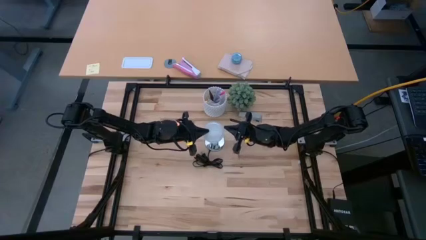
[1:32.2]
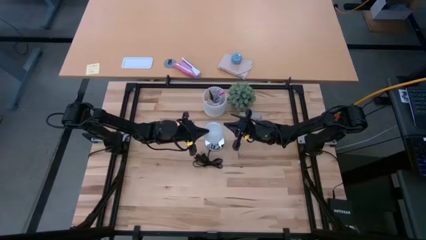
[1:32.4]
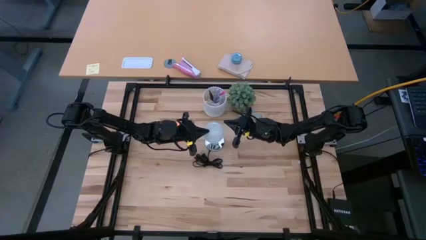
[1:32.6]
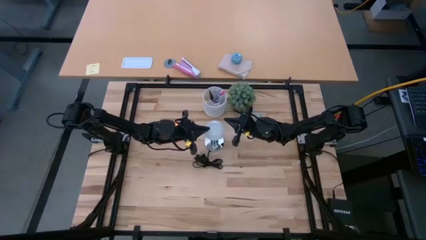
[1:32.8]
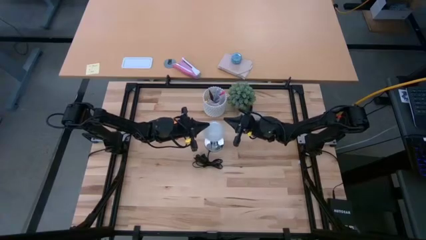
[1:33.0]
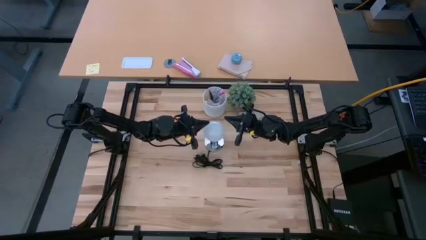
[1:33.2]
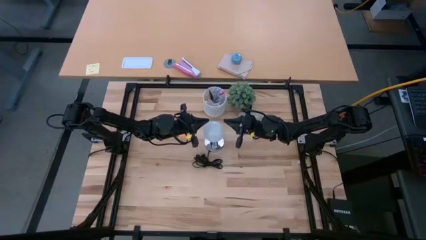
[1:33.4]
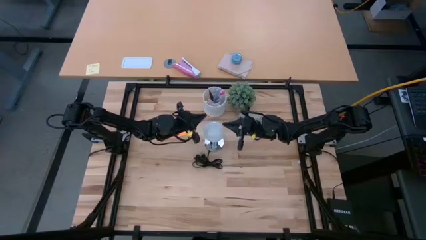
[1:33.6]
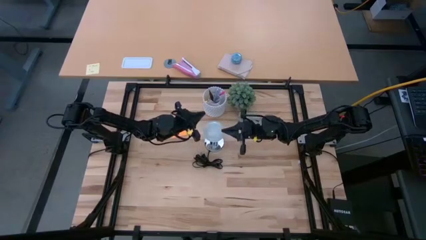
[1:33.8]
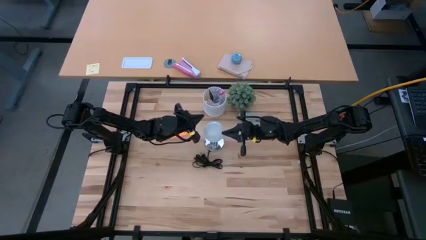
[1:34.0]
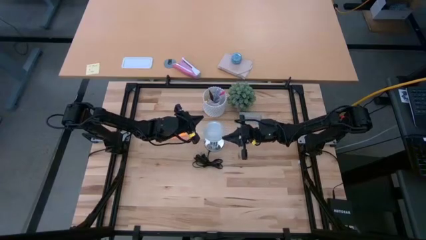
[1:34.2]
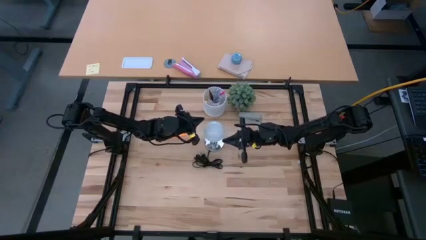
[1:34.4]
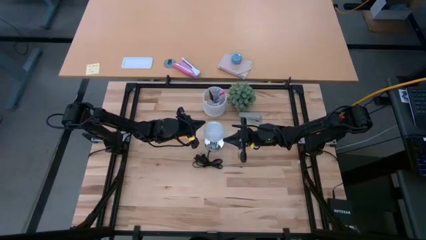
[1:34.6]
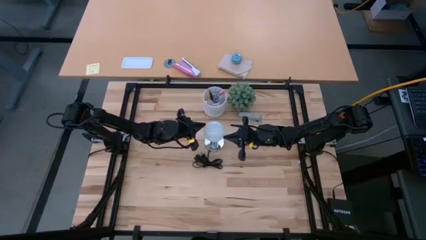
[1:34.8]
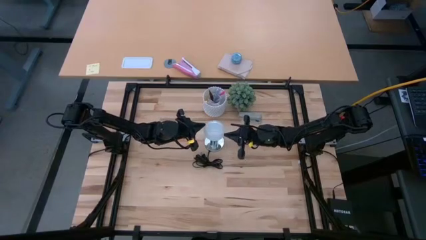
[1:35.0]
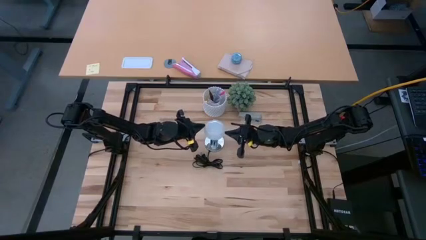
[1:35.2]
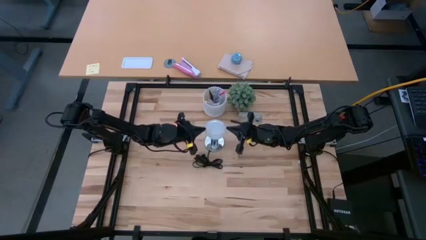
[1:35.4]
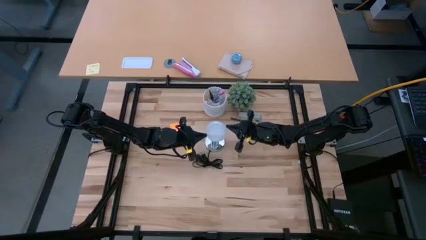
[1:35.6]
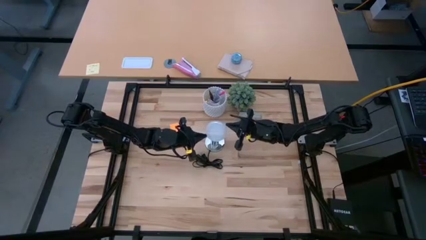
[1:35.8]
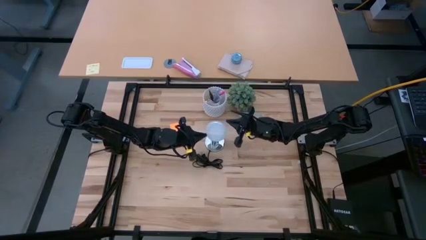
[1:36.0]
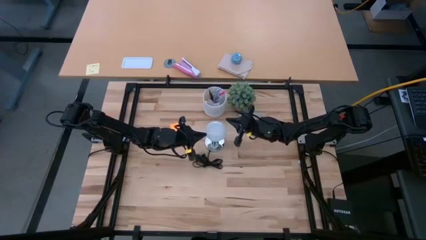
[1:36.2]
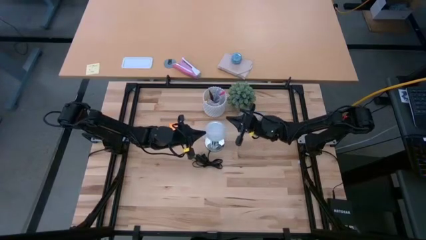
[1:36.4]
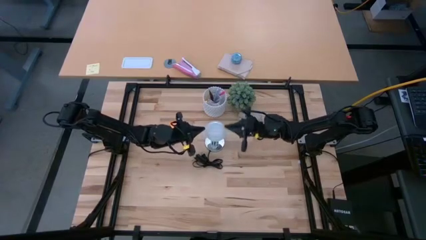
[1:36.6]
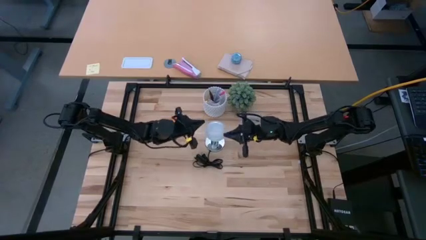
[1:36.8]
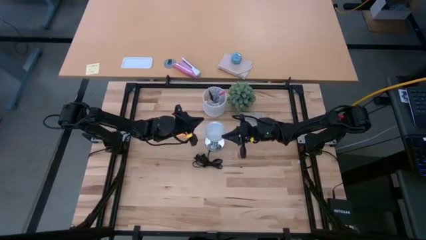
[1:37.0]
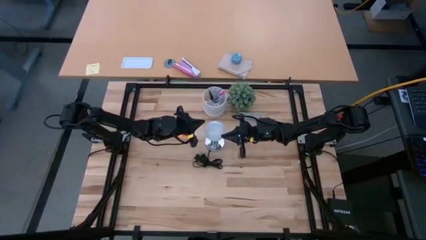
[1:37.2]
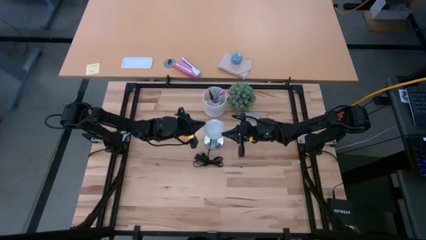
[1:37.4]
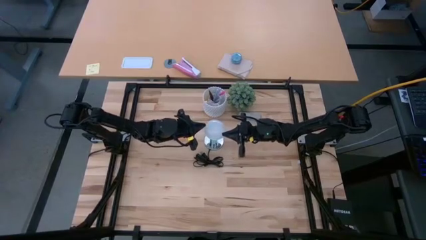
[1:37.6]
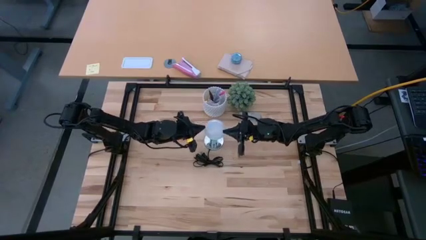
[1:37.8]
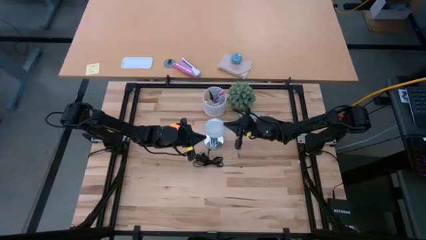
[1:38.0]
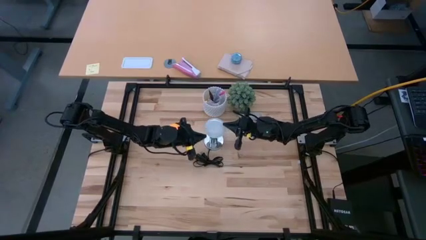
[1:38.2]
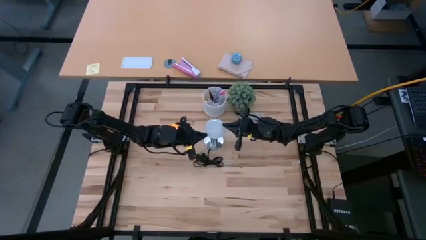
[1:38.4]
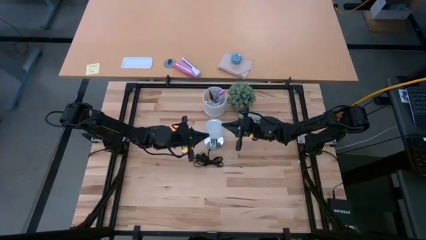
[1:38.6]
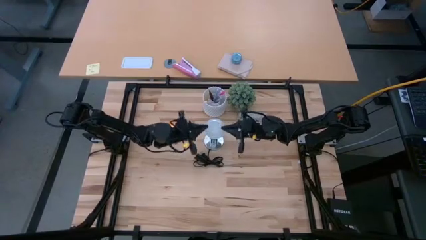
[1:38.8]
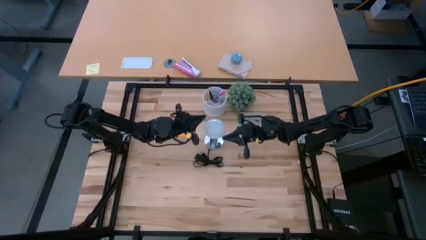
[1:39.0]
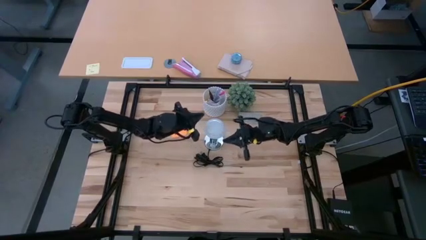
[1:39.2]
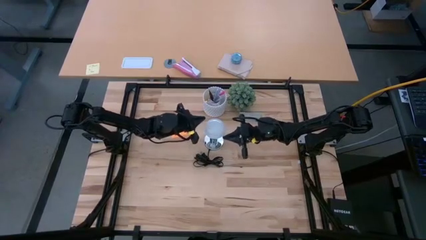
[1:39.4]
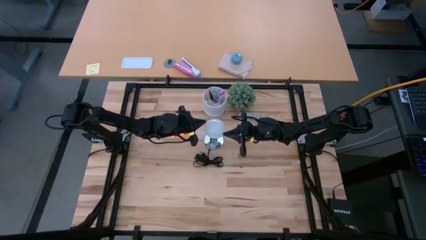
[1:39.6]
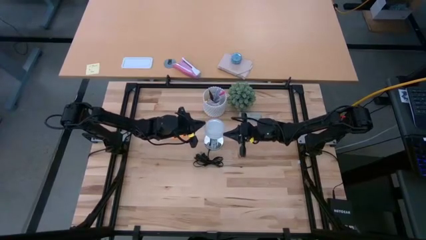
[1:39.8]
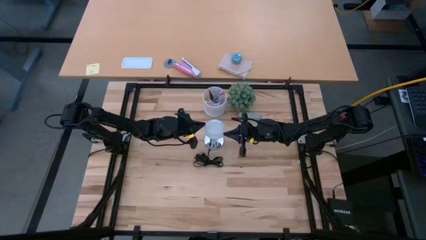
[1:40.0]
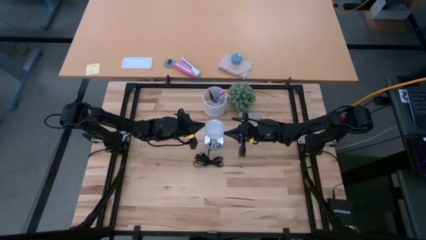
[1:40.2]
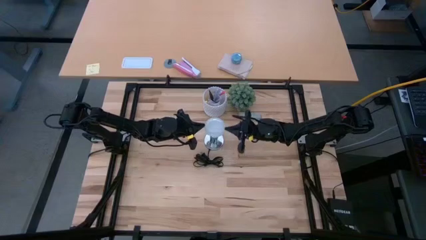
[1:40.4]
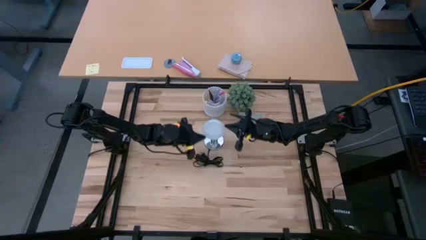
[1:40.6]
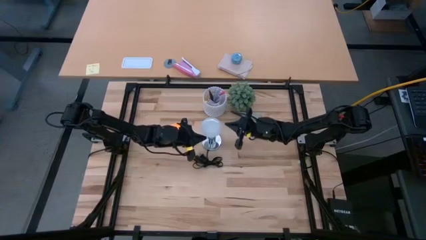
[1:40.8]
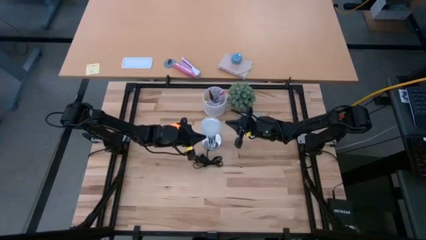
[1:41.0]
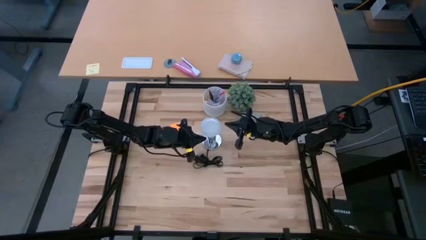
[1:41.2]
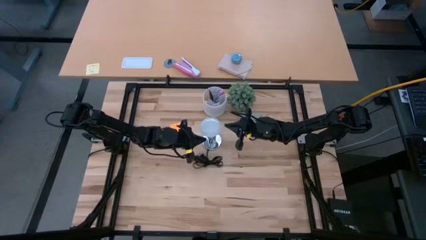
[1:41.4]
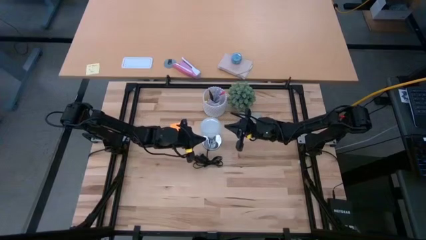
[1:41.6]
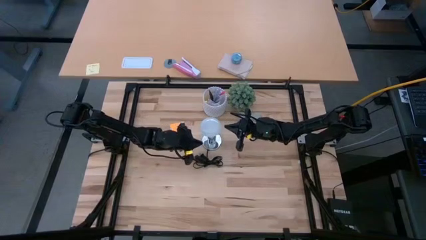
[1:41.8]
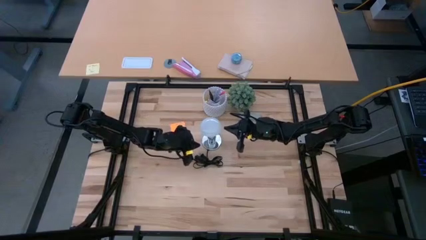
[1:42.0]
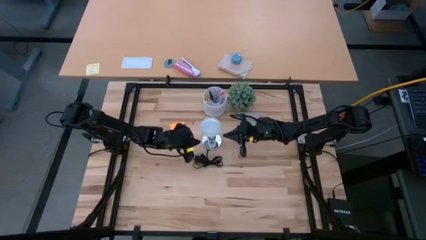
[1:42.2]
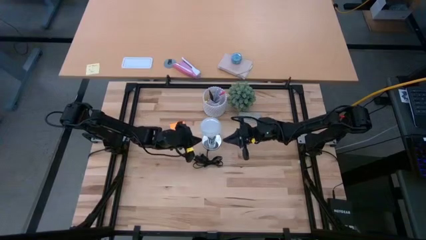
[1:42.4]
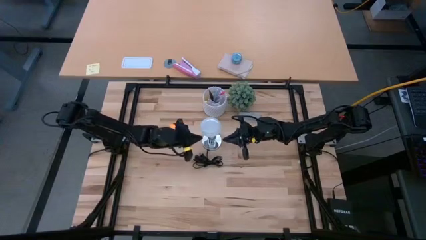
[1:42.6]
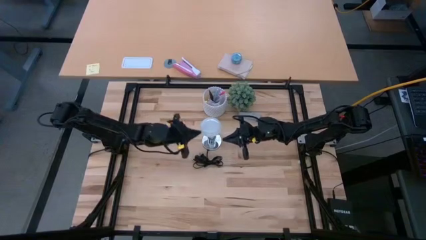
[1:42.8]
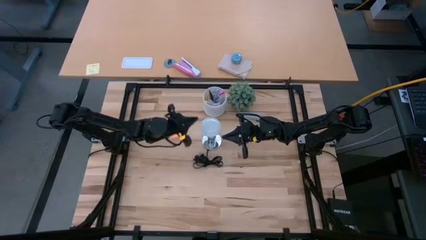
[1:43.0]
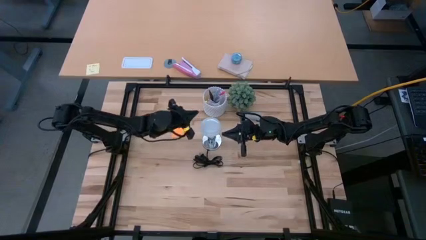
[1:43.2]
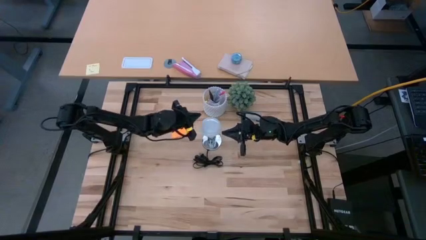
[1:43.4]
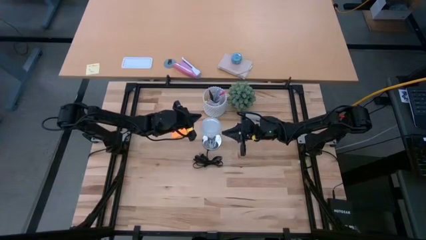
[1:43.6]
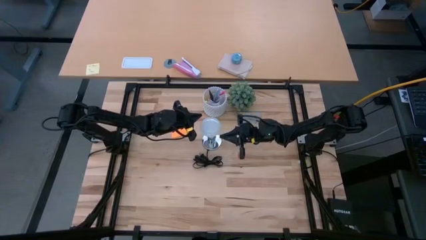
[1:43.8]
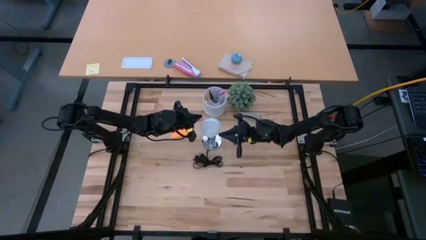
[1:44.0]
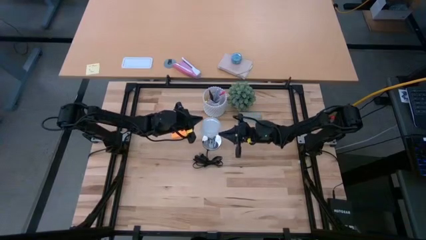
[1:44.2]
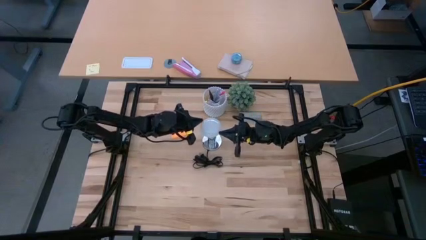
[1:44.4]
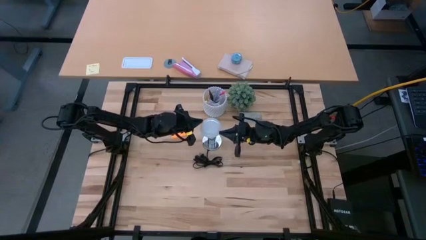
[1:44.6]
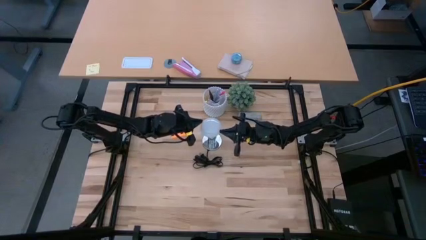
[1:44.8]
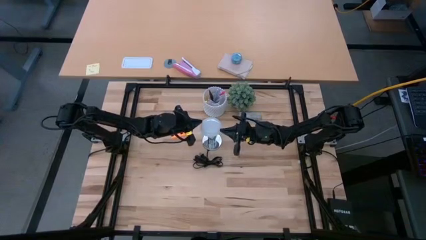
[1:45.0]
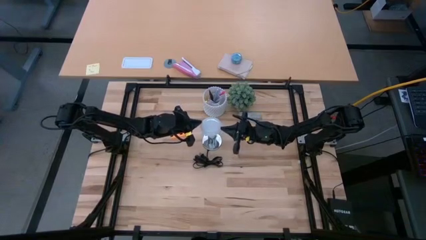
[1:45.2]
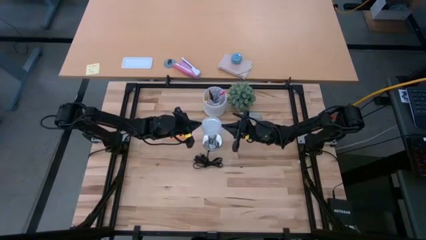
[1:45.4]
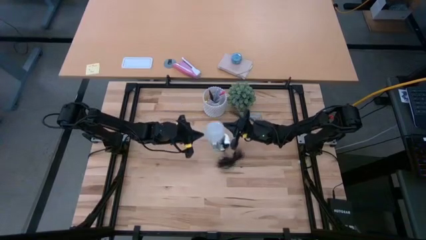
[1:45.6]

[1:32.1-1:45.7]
Task: Screw lightbulb
Remove the light bulb from the lamp socket
